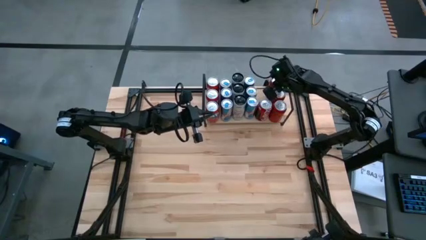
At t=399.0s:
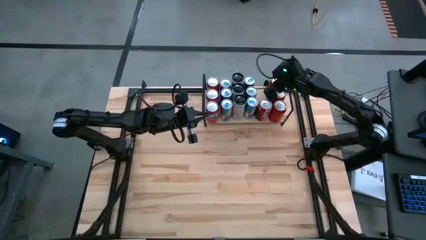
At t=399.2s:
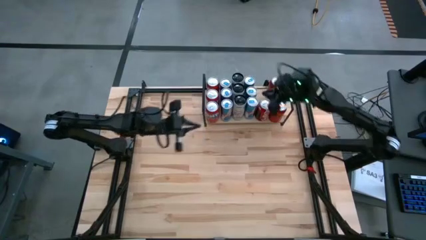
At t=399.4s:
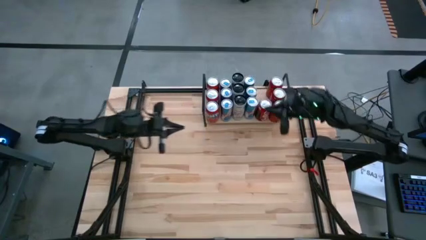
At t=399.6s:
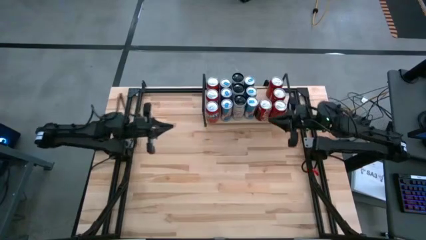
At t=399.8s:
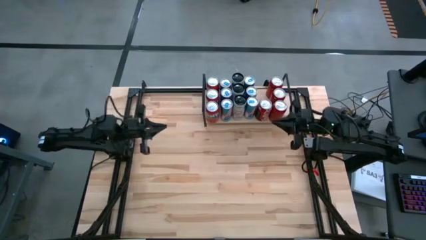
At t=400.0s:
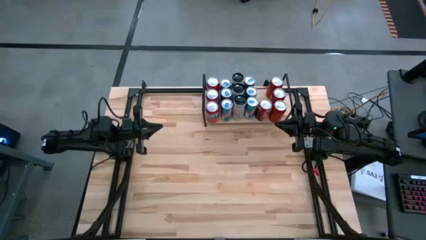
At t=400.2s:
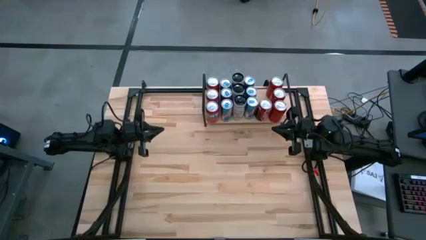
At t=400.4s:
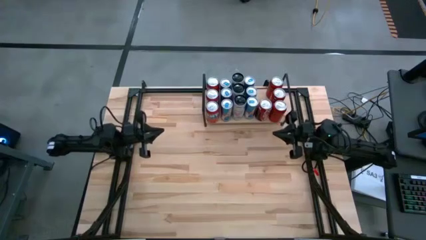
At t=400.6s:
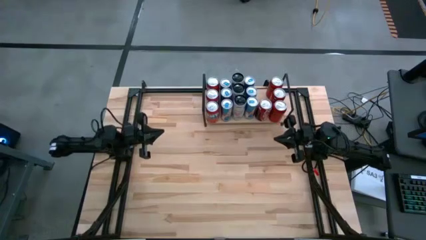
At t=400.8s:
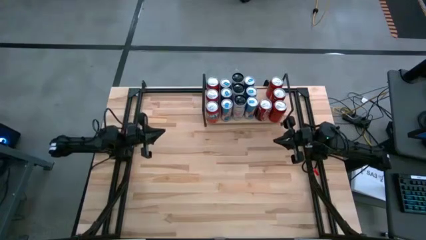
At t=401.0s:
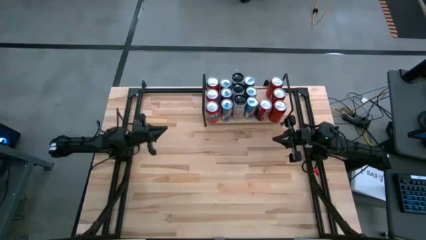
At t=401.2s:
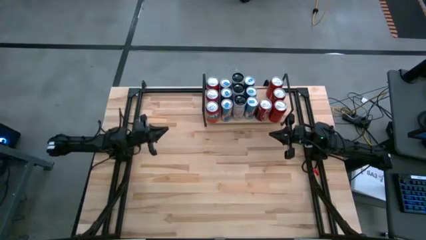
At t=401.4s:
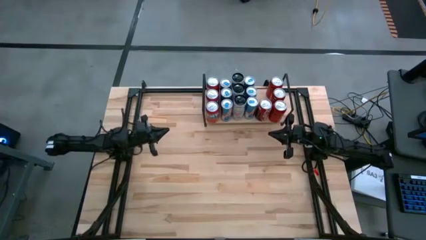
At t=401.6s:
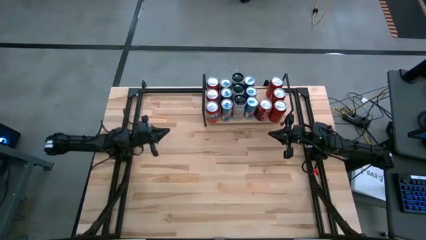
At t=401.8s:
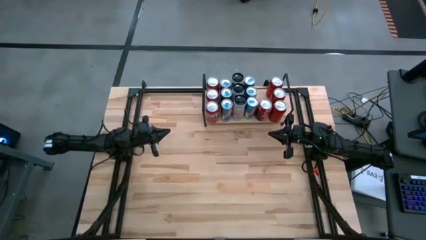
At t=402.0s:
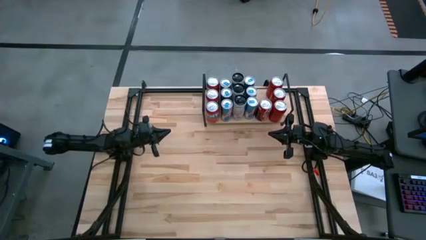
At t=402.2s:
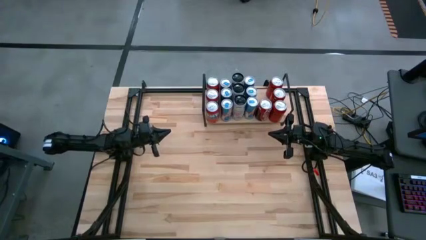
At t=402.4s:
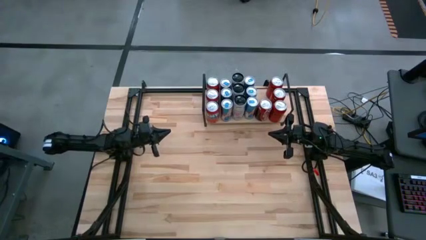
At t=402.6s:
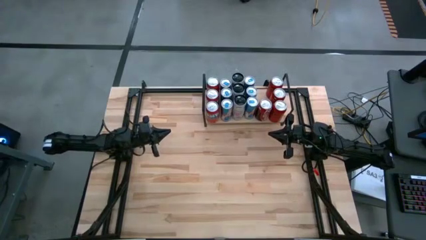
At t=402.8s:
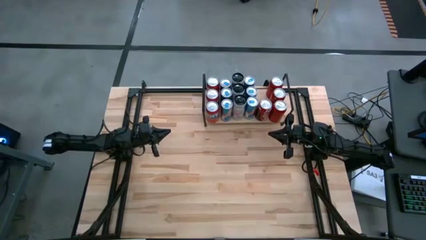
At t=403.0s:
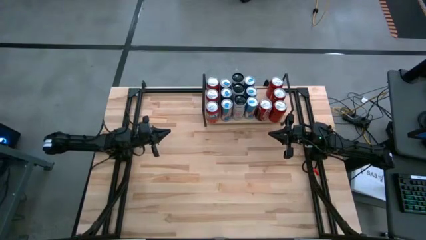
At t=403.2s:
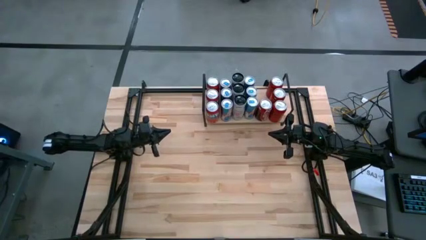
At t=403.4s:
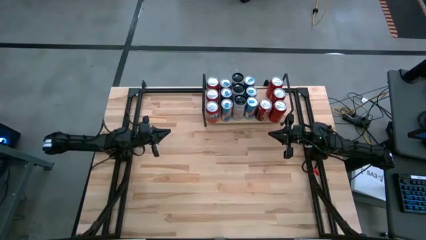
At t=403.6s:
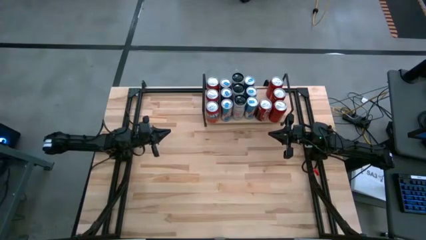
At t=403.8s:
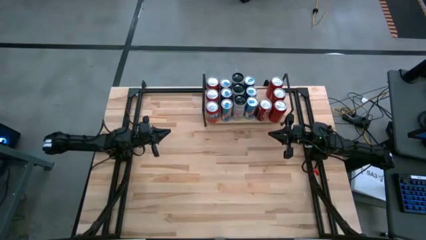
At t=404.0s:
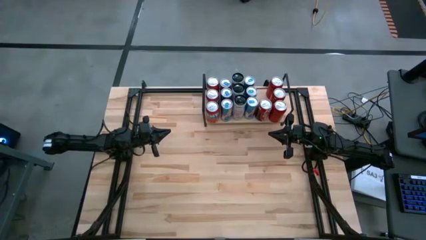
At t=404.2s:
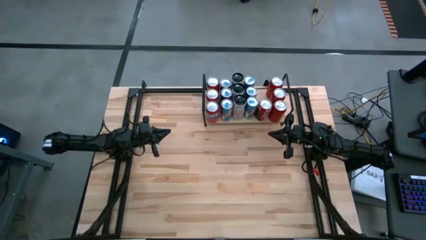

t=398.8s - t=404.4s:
Task: Place canned beverage on shelf
Return to Home Position

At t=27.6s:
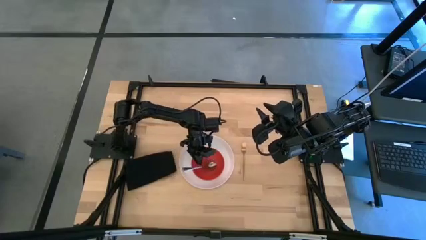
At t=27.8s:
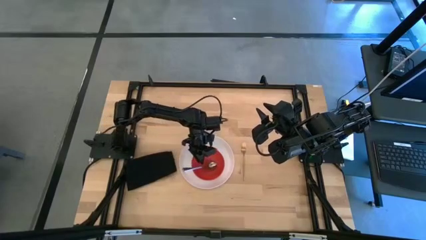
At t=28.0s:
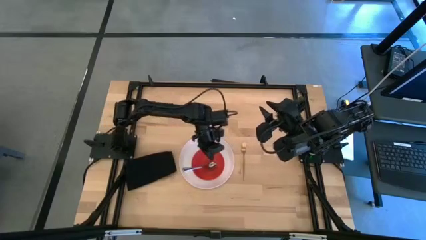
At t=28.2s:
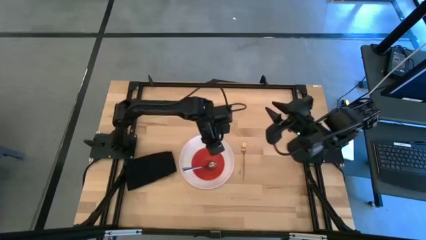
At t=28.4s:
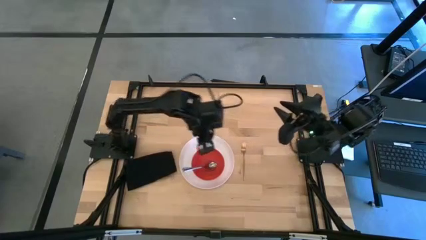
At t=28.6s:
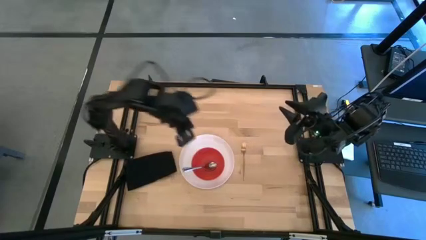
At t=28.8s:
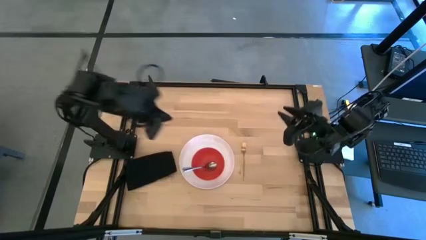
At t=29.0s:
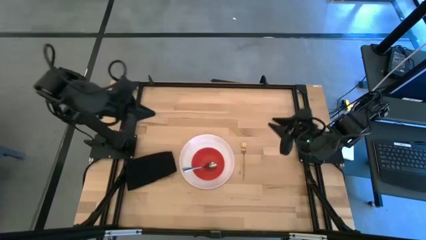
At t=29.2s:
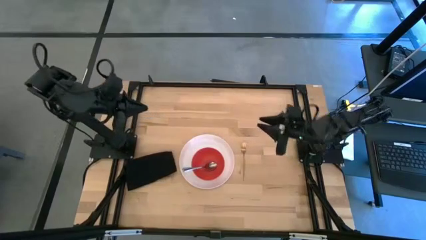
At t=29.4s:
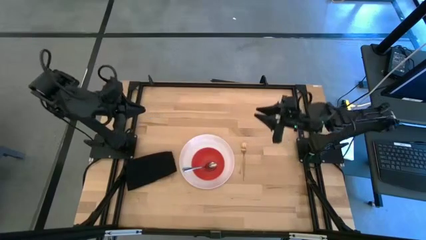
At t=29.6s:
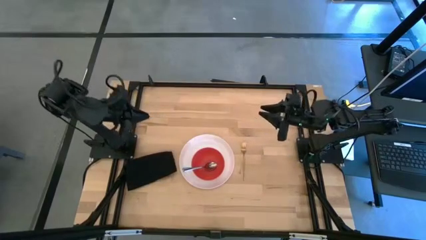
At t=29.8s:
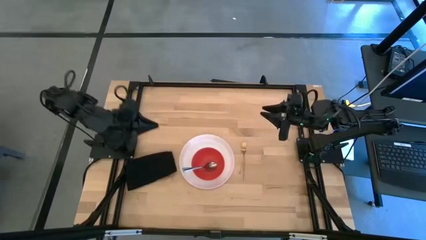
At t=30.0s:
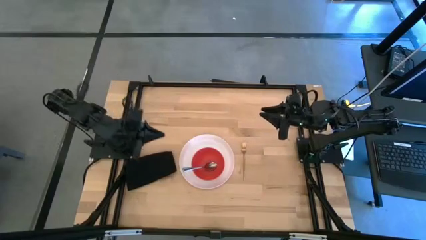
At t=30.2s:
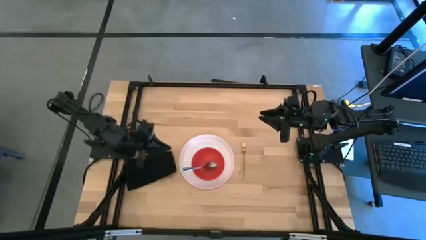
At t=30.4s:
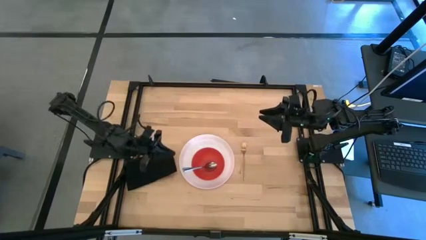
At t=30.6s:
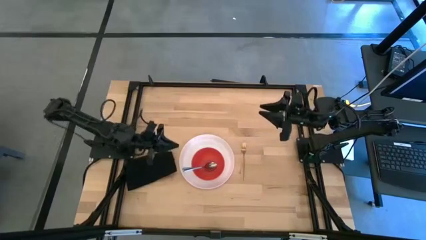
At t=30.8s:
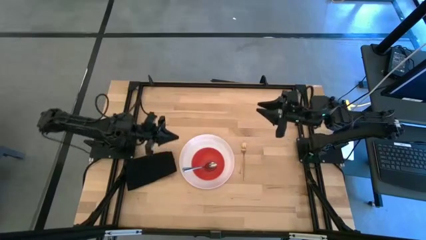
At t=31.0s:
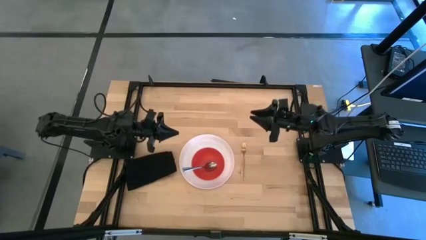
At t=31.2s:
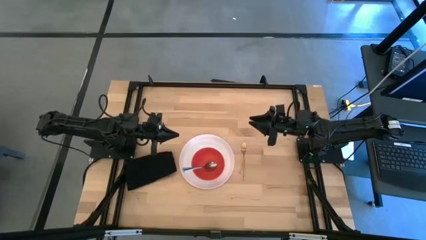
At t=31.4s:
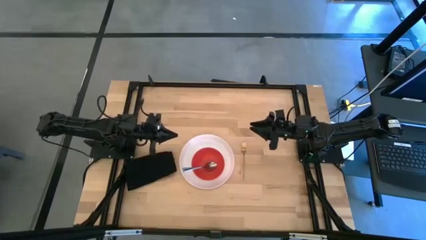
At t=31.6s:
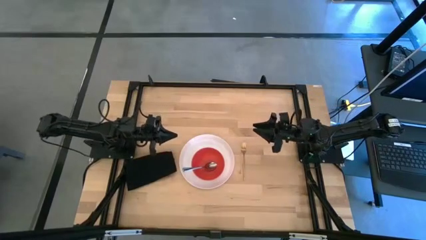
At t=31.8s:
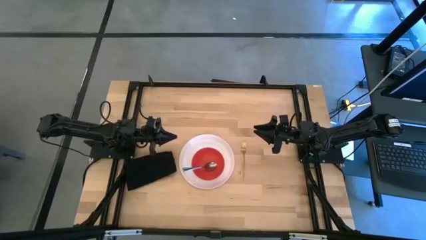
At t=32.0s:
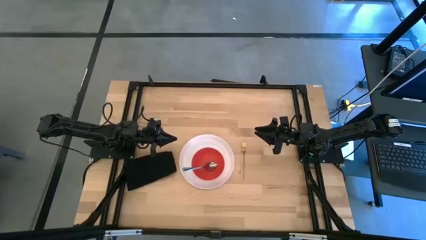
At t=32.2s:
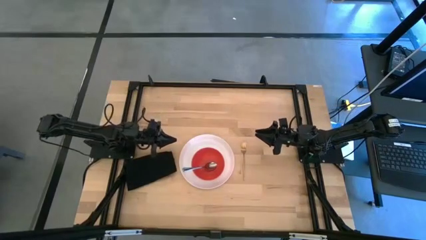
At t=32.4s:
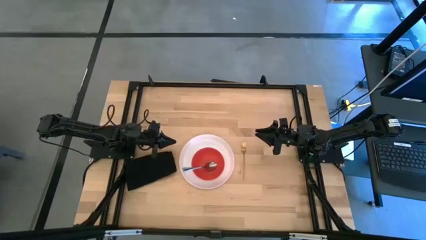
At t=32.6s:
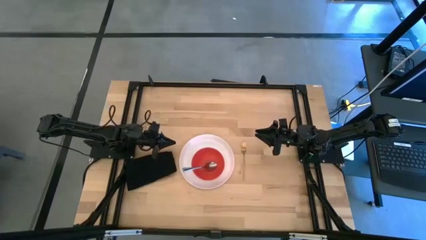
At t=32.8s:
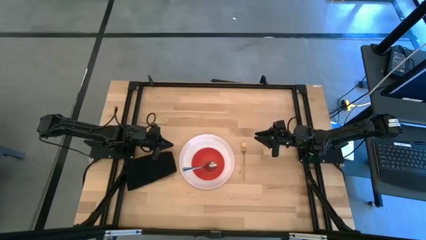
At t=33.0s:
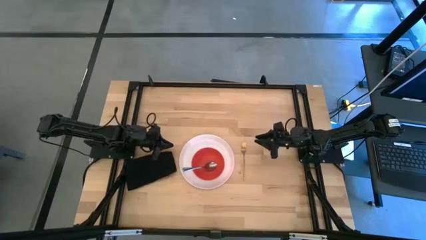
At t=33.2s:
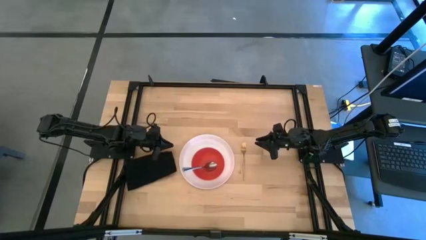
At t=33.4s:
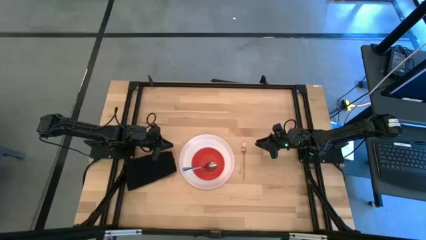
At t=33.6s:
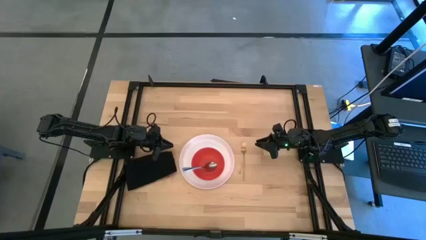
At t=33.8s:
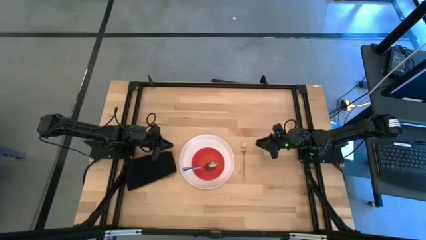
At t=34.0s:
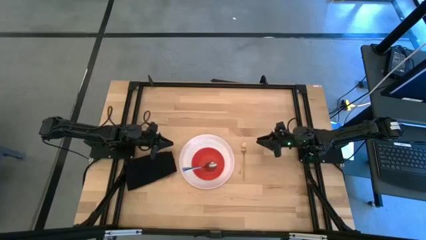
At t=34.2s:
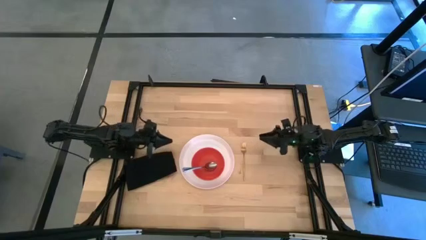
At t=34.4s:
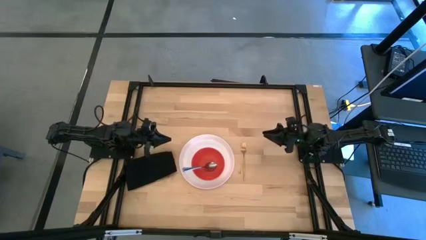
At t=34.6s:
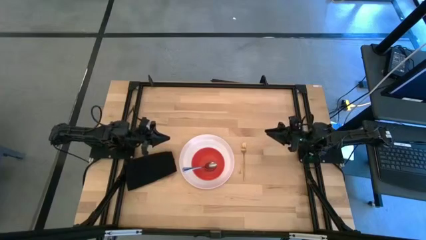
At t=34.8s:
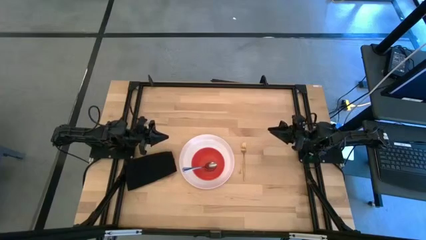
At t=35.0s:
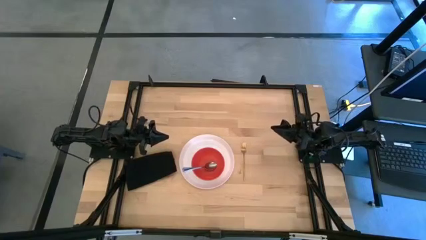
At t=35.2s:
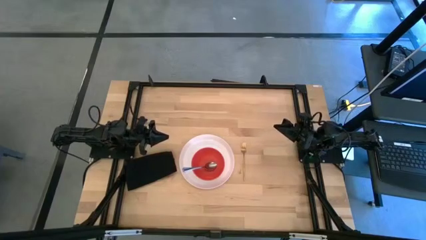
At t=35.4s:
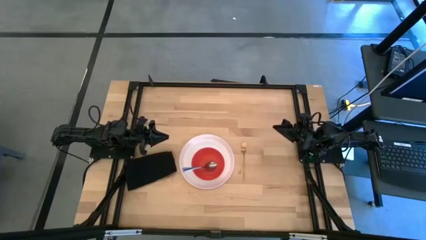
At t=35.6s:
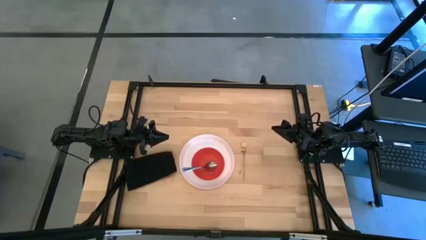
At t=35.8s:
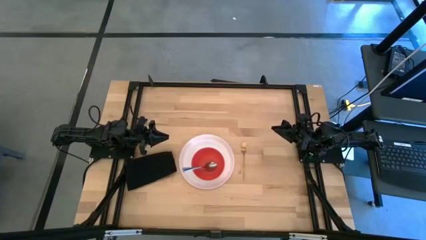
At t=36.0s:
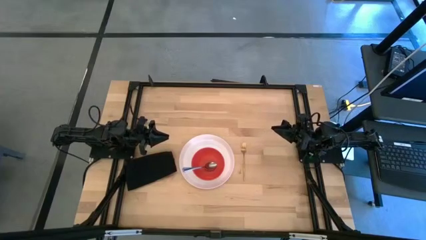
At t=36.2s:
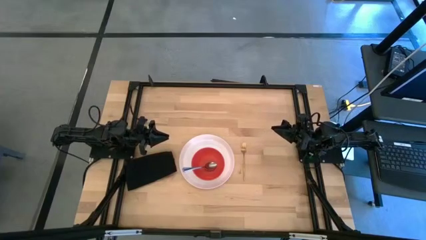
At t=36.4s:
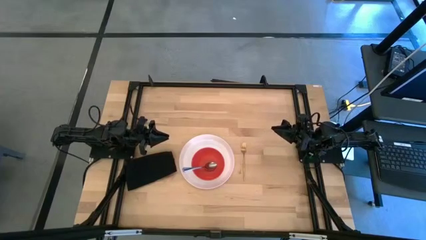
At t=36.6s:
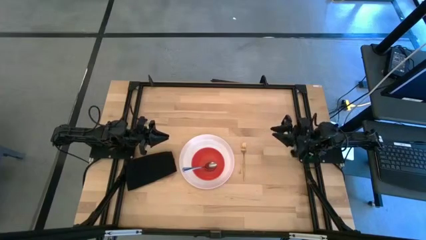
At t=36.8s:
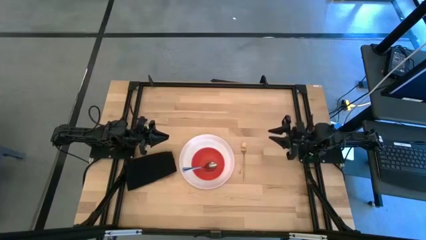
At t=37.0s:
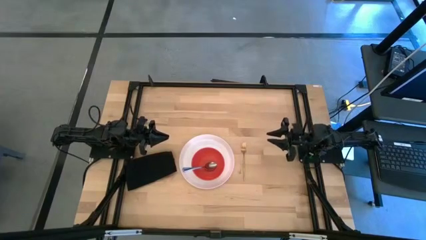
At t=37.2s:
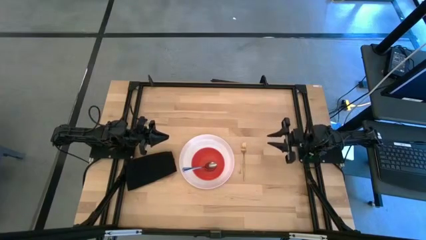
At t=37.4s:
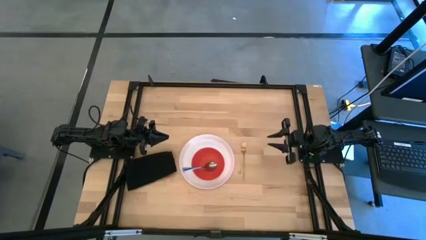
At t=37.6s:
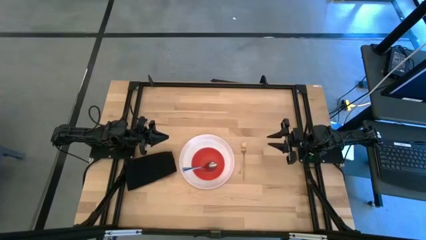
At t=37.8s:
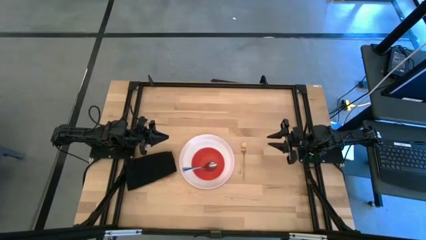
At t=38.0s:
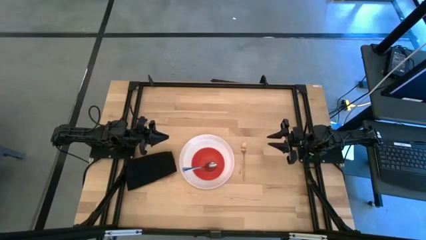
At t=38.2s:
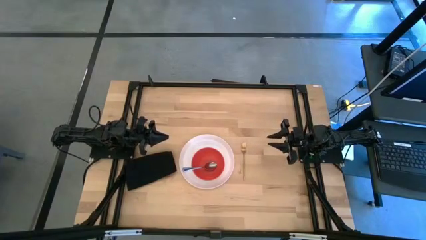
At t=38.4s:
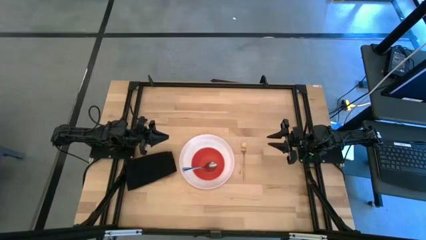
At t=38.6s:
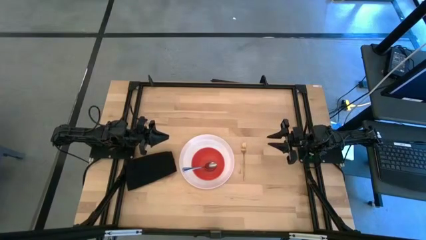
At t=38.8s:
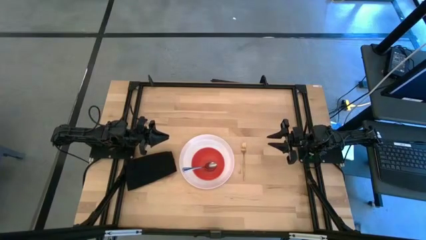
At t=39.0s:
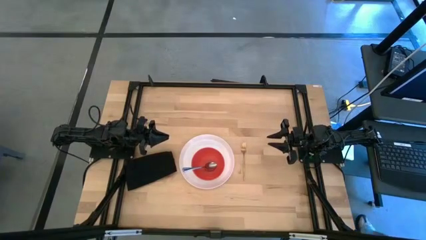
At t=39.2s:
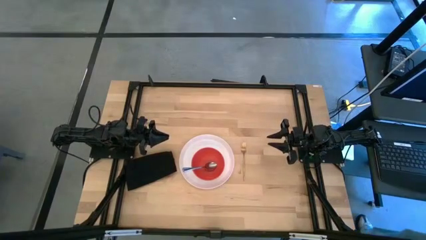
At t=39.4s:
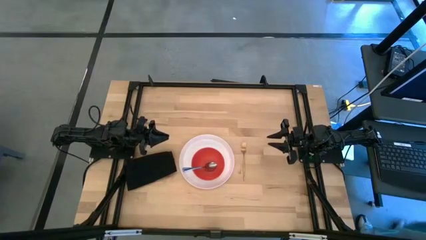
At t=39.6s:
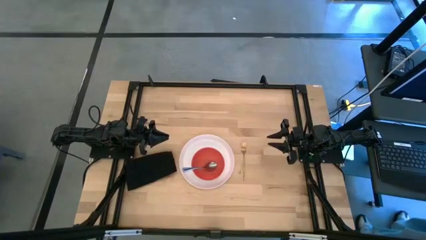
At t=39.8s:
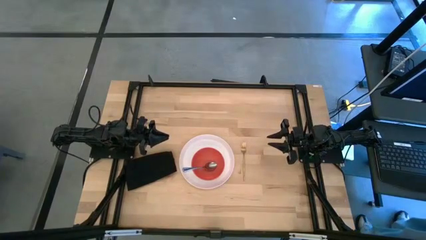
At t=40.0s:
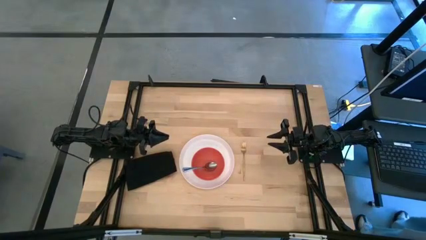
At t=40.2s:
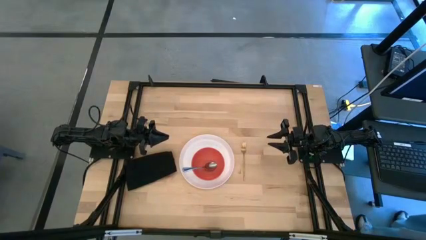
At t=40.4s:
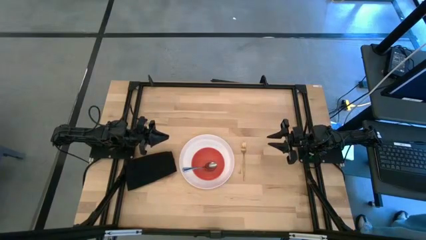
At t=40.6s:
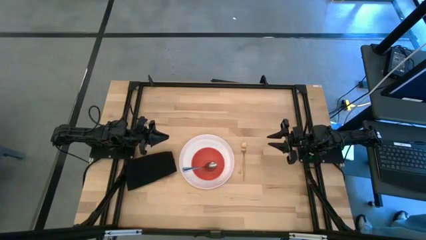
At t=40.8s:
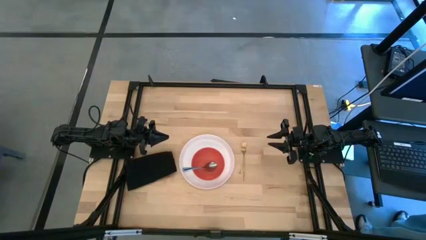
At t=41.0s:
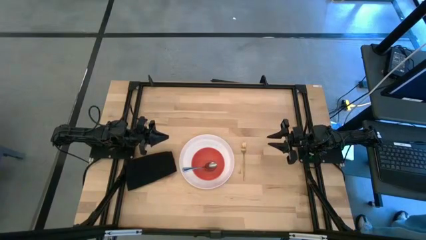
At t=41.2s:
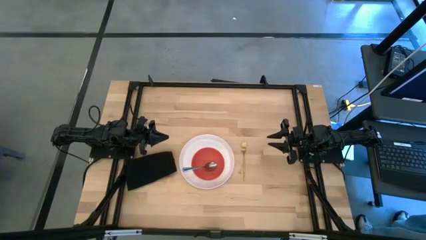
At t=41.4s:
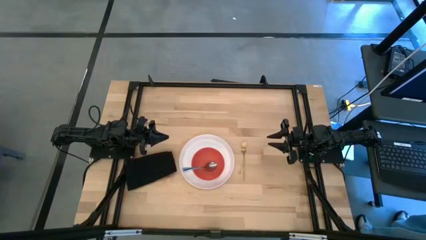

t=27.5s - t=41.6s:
Task: Set table place
Return to Home Position
